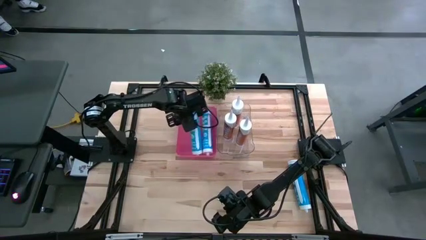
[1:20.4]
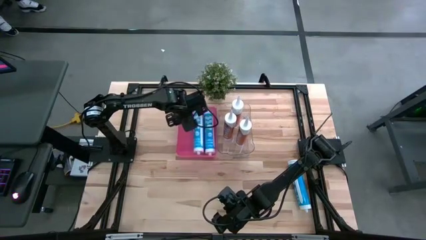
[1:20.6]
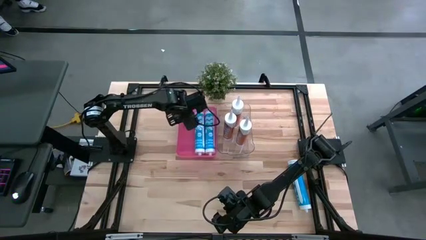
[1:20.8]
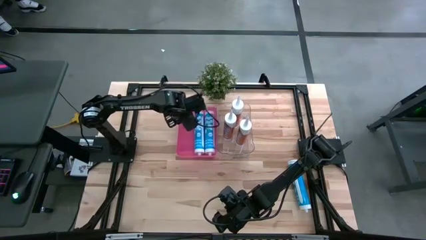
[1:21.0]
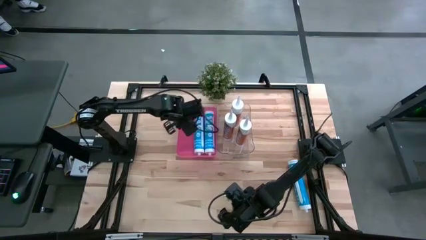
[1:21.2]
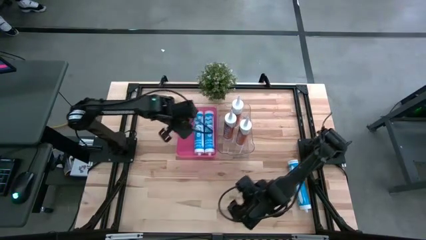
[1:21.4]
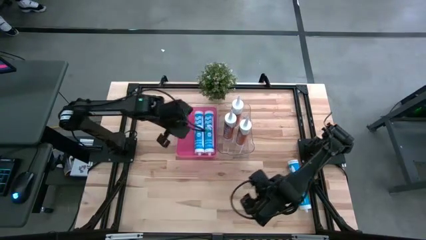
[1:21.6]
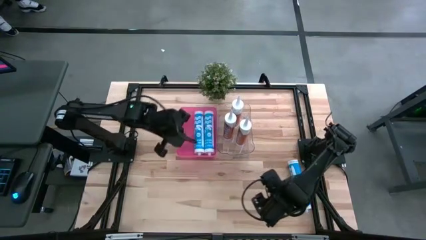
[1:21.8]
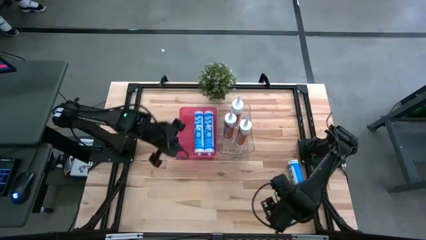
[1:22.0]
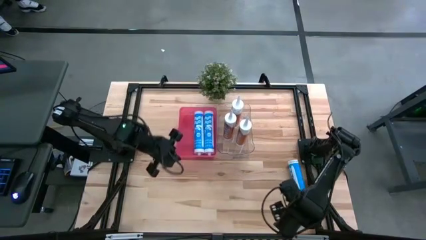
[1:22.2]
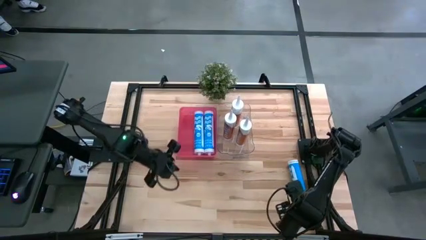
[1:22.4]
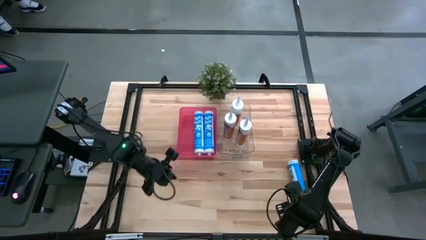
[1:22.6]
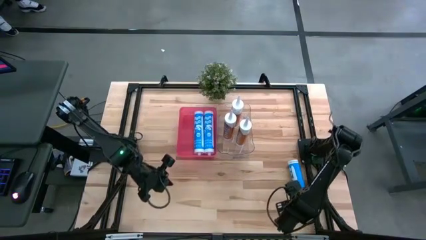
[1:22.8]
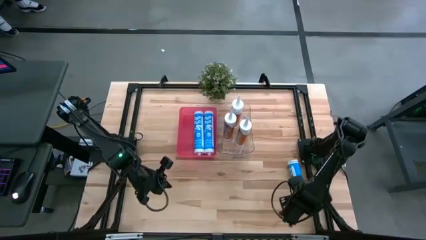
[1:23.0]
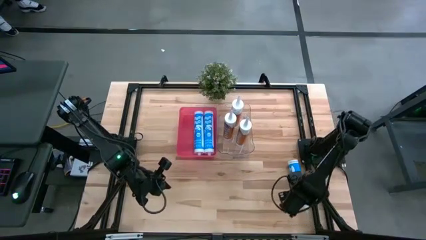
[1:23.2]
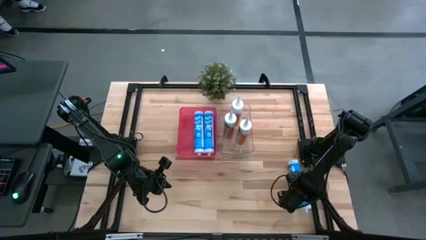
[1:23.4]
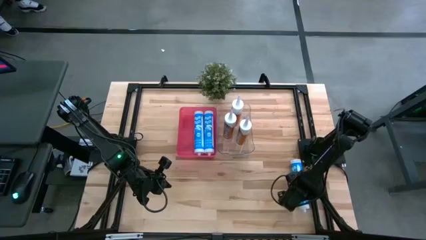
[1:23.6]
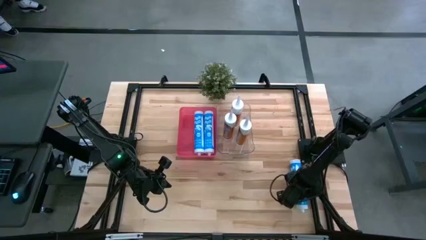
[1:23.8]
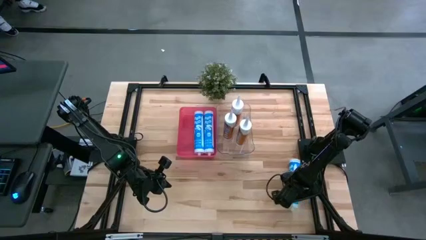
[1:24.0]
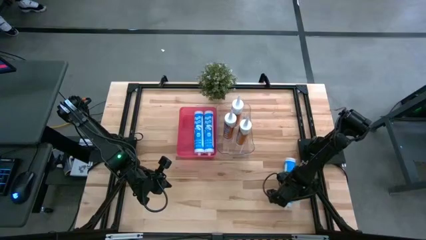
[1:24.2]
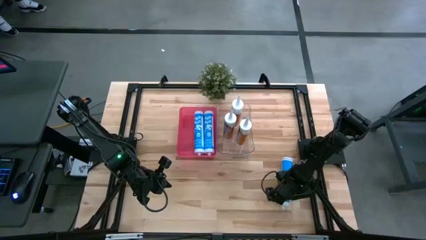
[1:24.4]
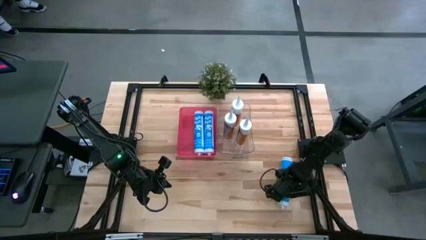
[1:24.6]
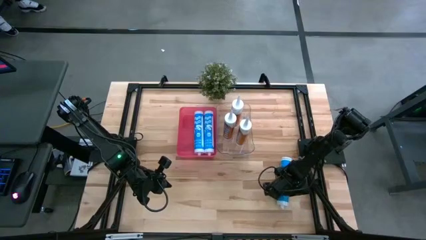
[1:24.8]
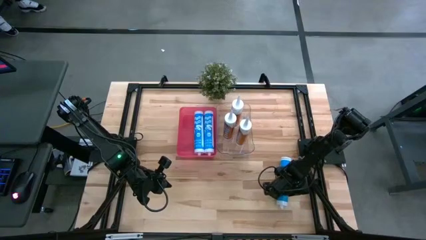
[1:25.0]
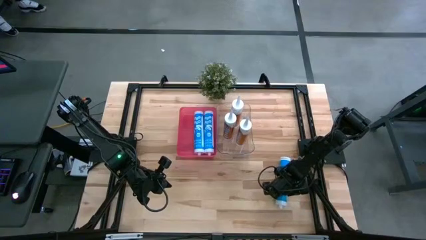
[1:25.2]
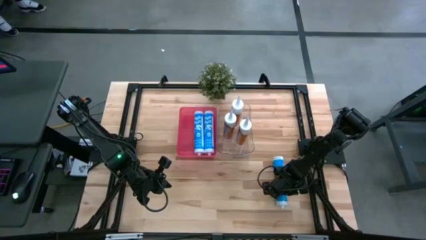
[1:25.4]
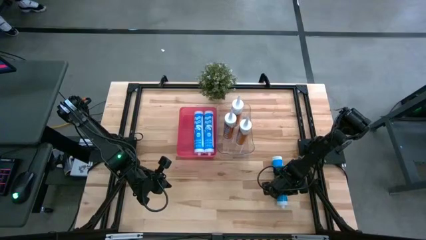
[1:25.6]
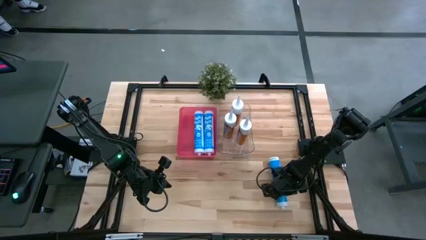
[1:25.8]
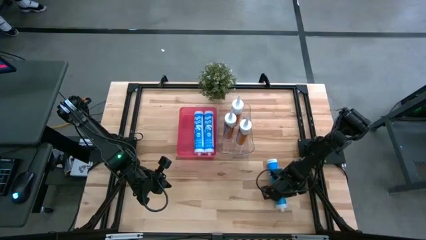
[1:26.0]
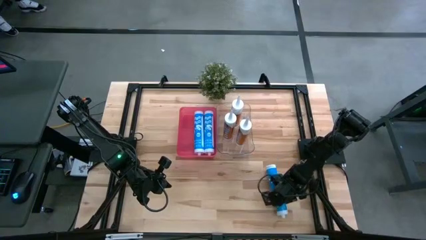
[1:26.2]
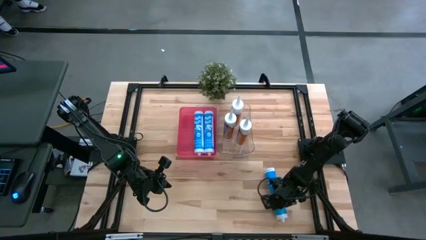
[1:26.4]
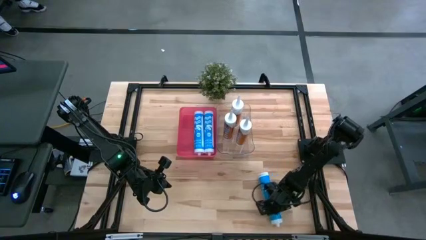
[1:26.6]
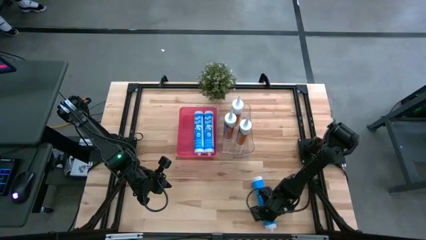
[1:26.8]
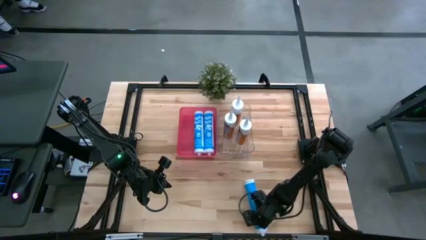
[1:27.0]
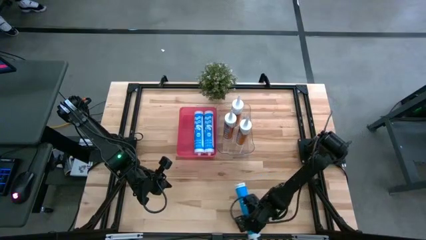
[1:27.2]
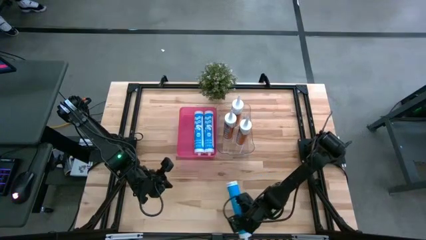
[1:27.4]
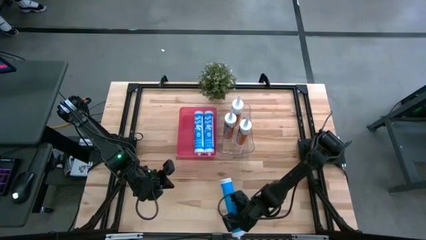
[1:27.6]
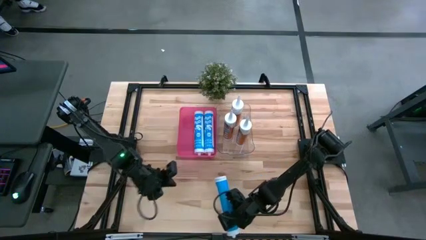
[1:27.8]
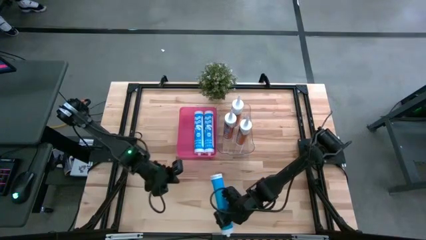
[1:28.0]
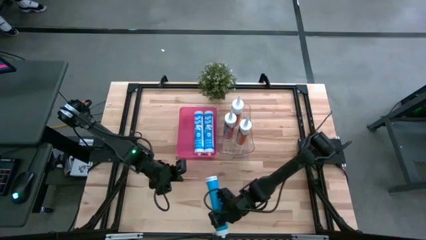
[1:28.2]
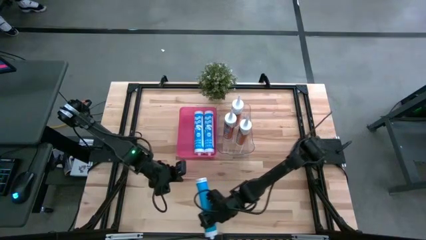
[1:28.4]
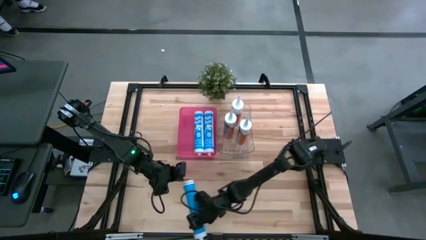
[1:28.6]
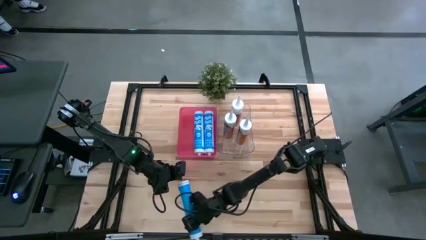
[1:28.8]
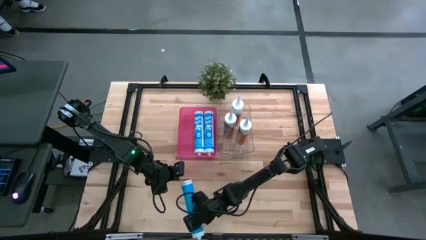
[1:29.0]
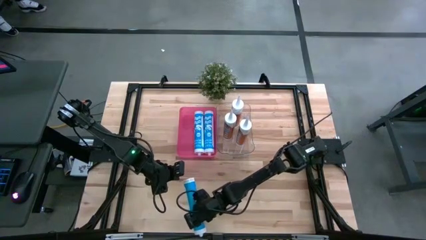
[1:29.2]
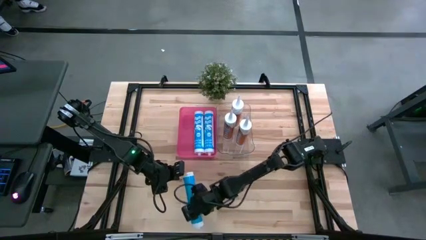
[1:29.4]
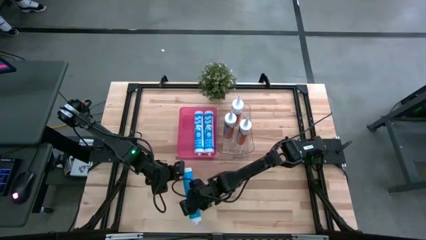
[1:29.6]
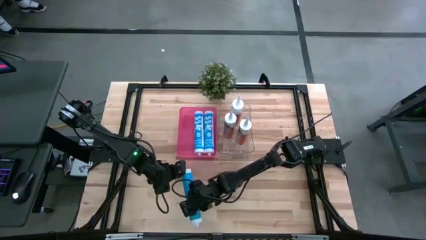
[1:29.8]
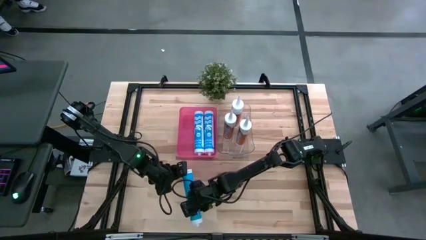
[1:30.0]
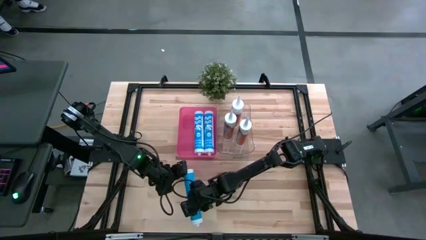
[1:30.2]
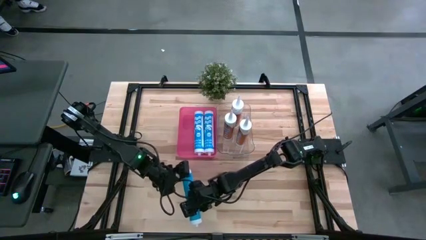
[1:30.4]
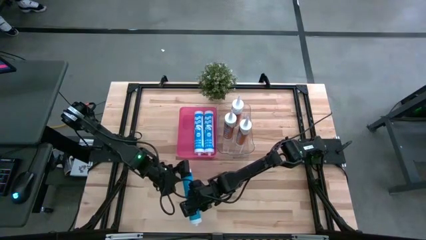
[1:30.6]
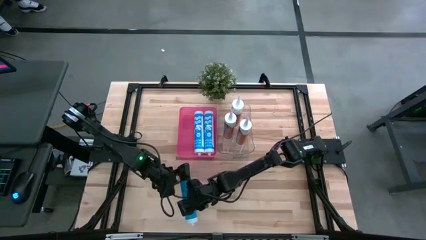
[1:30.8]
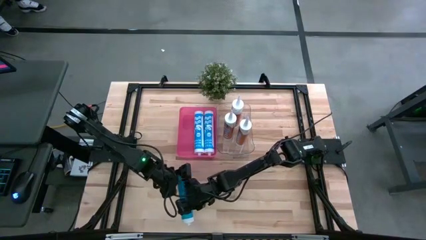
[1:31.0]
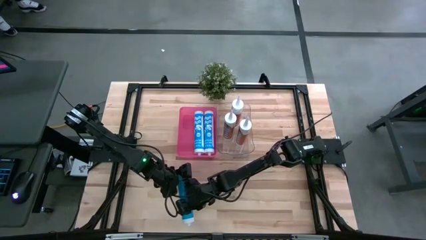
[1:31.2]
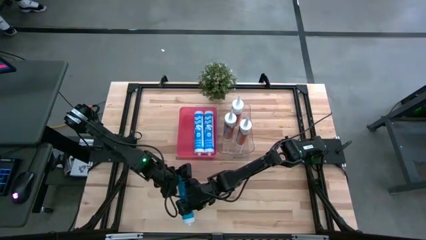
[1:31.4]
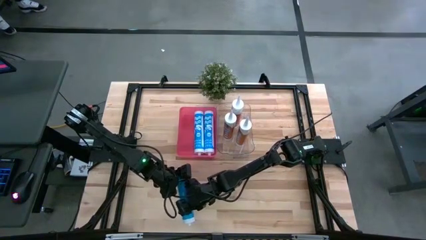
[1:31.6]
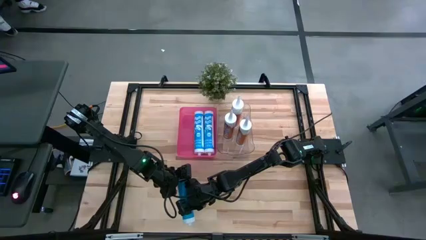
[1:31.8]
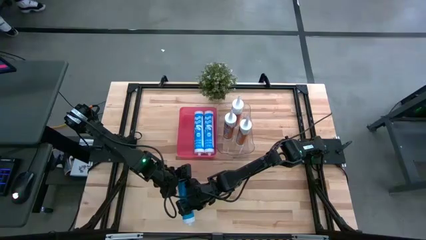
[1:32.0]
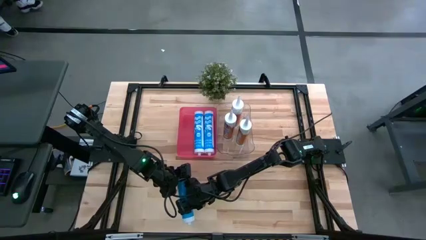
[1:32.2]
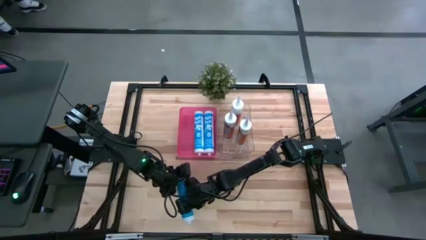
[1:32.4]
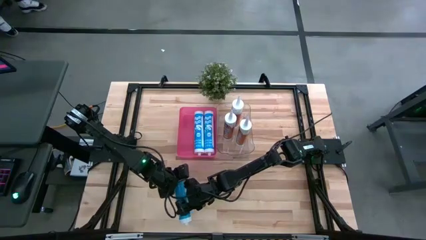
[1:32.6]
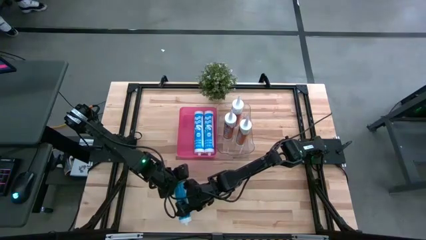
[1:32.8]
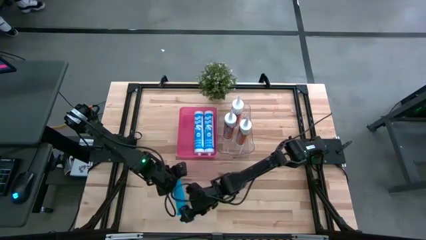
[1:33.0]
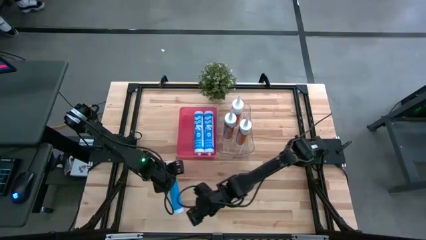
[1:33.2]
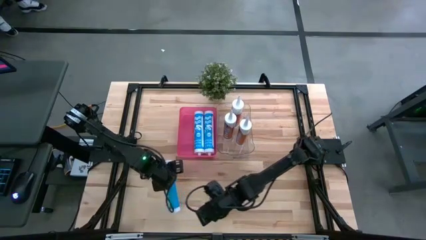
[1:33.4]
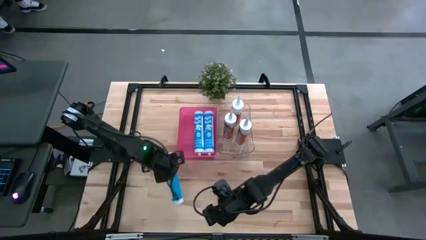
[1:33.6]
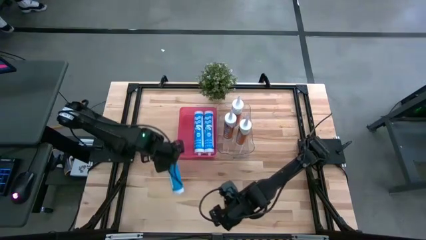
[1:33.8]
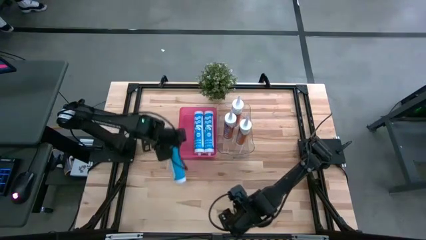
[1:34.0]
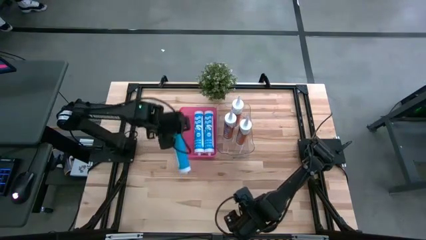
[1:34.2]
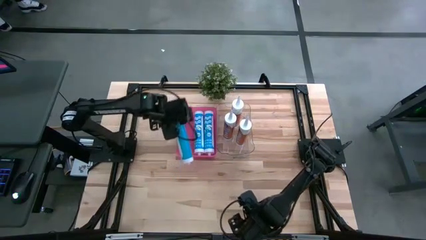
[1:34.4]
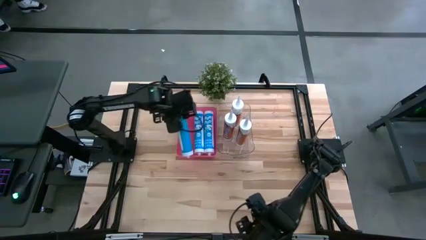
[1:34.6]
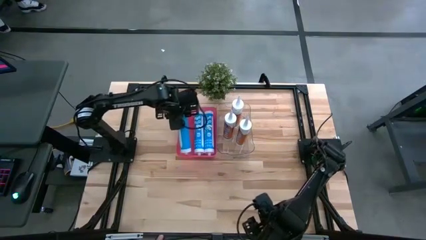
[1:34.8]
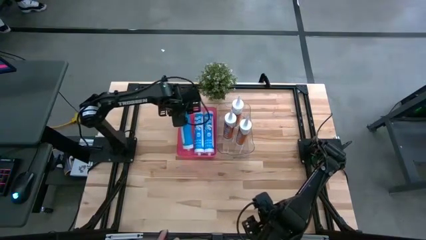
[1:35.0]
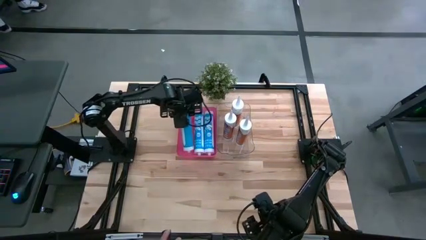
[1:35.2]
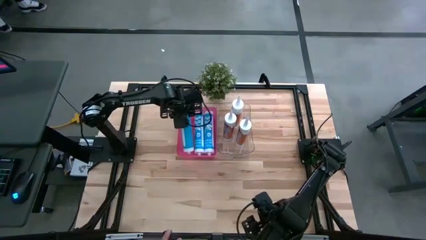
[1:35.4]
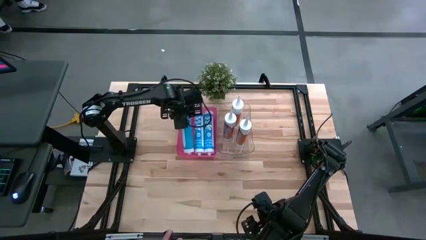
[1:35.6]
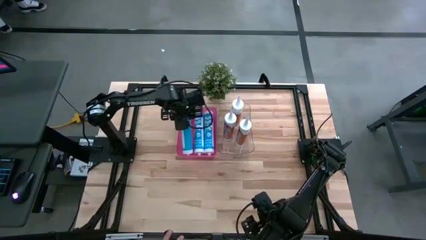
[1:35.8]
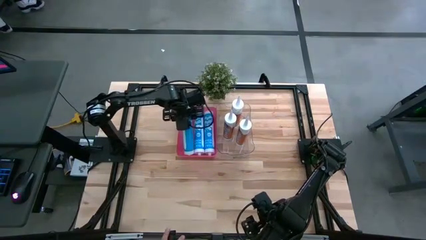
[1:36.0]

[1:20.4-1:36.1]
Task: Pick & place silicon tubes, Sealant and Lysol wipes
Put the blue sealant into the pink bin
